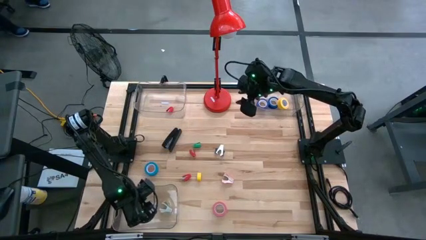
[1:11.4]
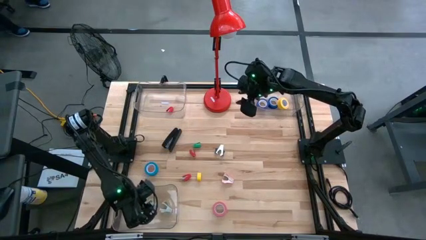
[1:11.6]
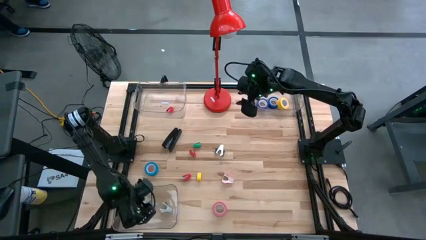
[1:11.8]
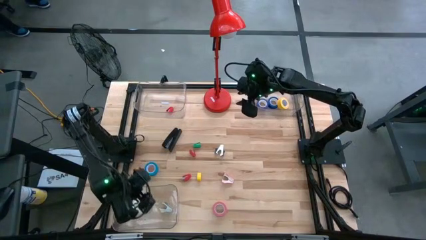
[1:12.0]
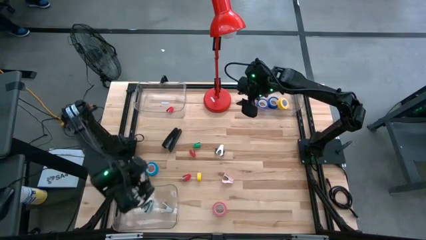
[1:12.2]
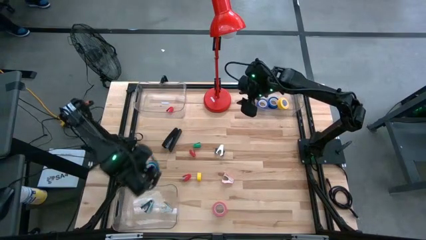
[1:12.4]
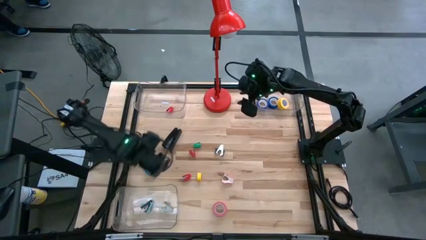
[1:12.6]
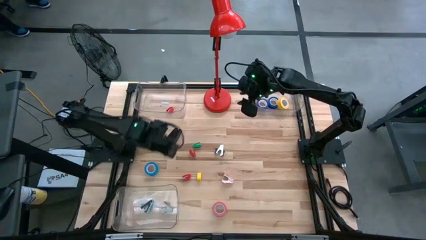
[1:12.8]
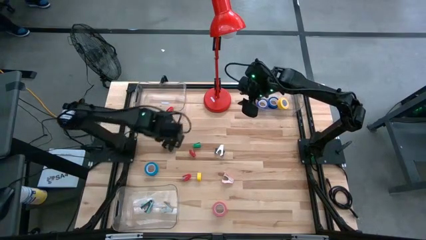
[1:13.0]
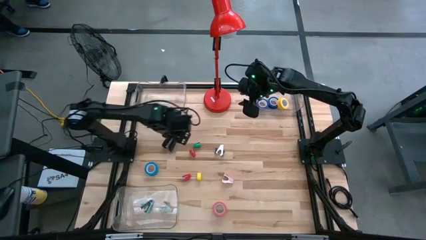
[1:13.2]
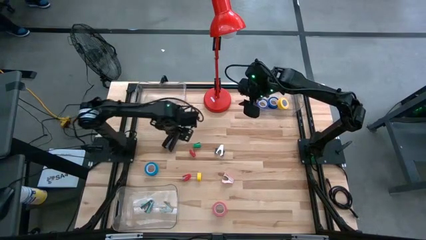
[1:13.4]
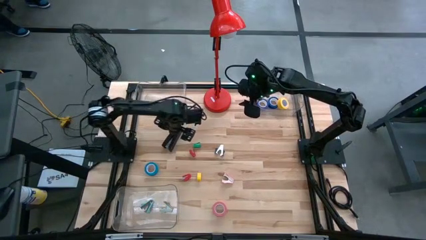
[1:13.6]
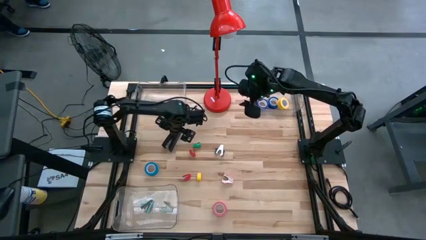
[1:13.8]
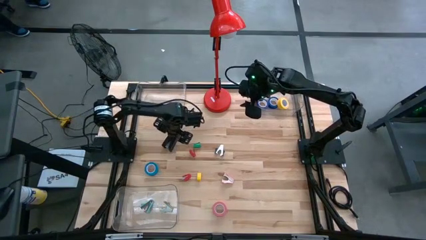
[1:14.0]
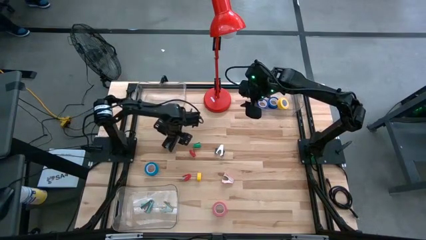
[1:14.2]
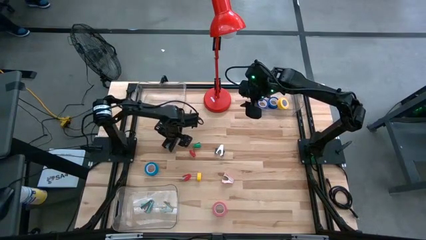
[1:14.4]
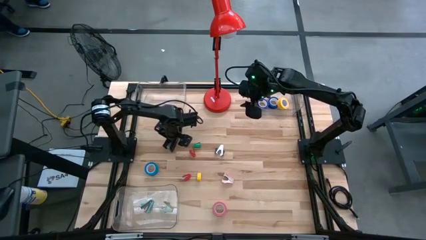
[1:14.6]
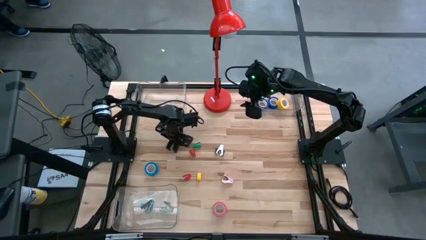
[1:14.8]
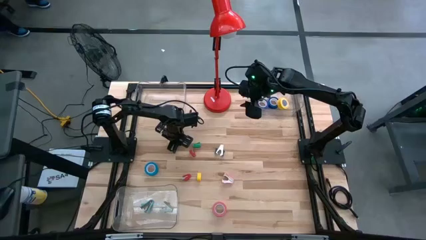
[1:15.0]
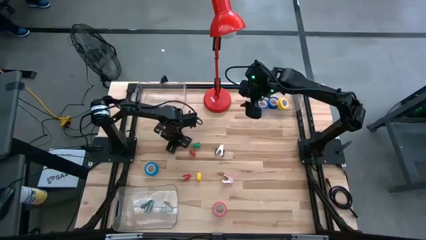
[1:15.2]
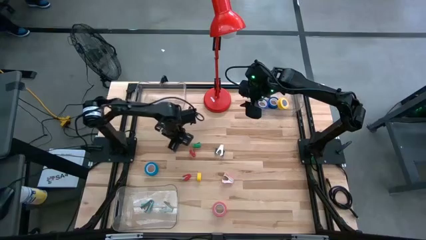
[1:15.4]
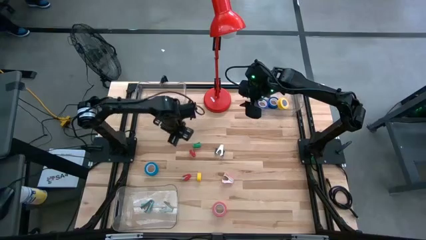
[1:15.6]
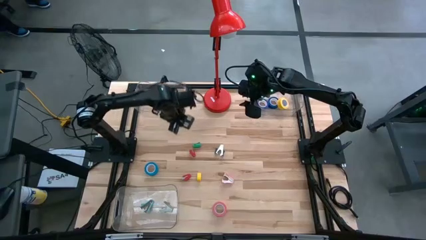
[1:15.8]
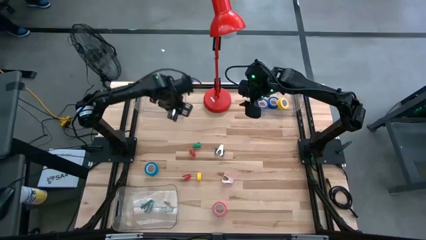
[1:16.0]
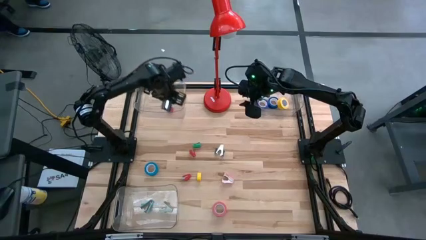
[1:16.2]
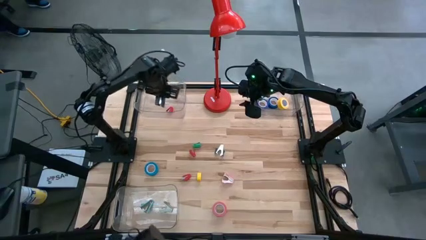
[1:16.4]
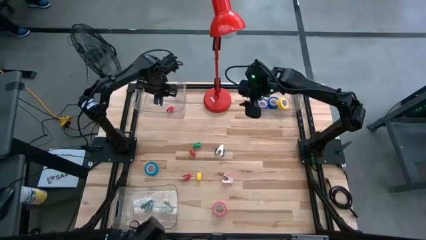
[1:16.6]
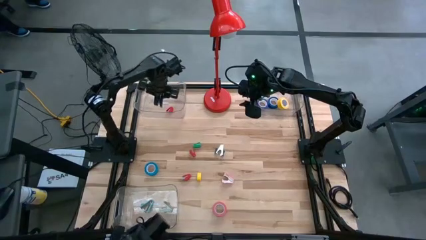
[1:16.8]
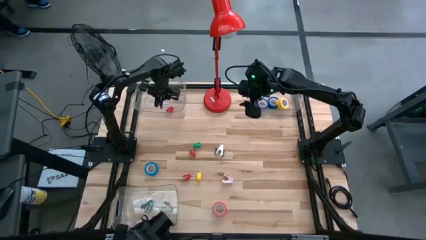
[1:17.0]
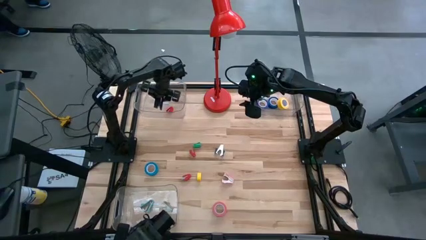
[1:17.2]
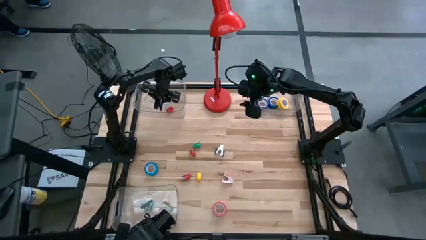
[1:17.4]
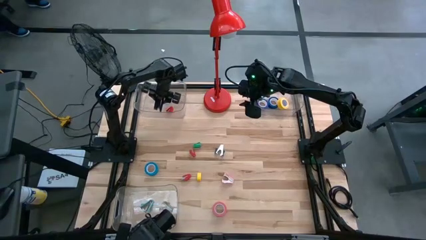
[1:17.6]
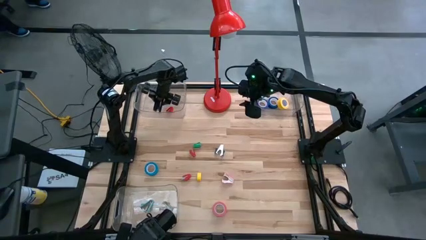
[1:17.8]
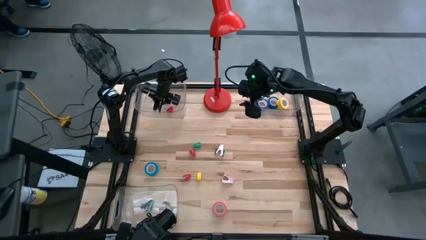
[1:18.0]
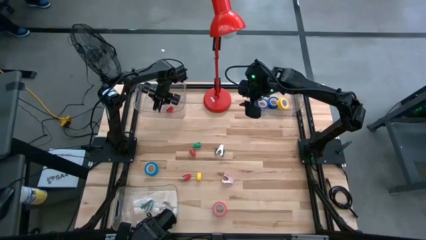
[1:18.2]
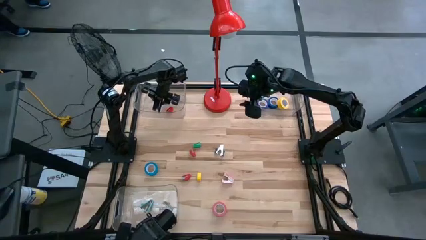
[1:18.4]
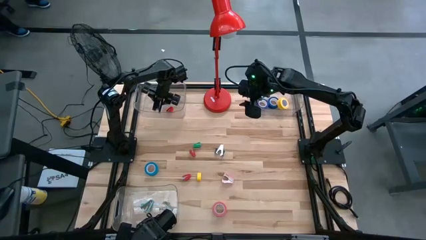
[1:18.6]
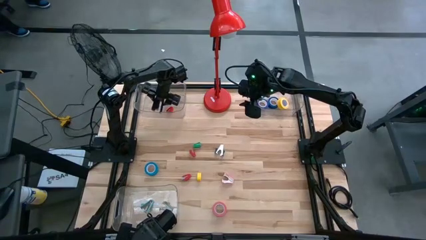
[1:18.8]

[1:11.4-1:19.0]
Task: Pick and place Stapler, Stapler remover, tape
Put the black stapler into the top left transparent bin

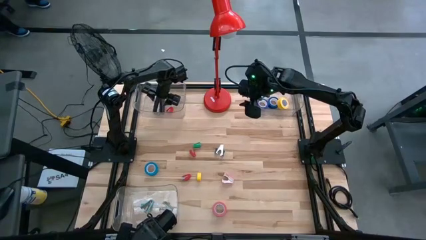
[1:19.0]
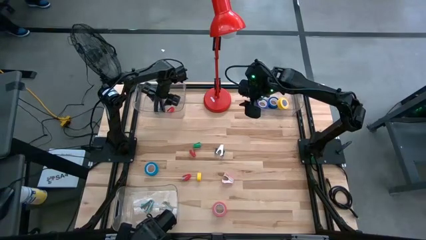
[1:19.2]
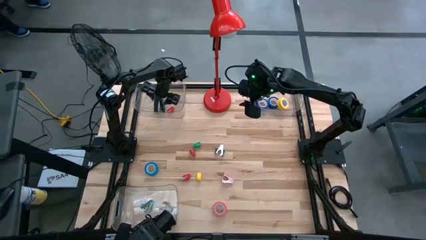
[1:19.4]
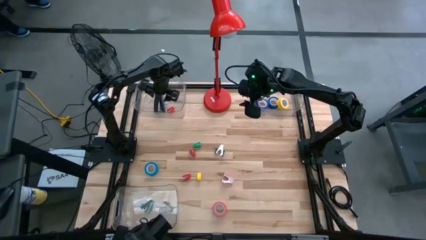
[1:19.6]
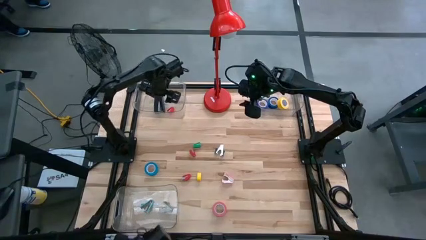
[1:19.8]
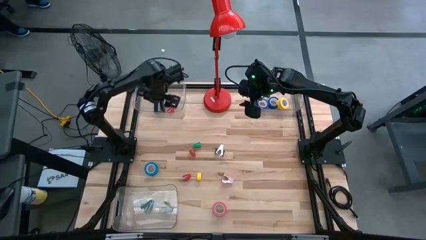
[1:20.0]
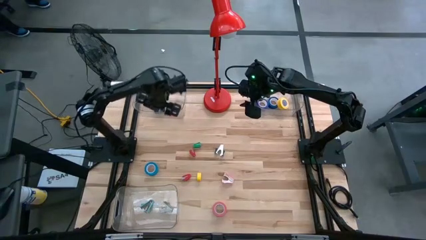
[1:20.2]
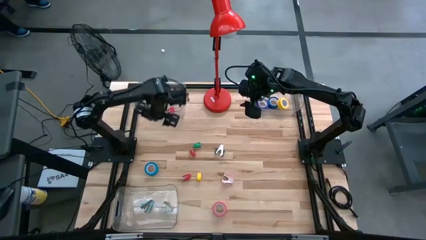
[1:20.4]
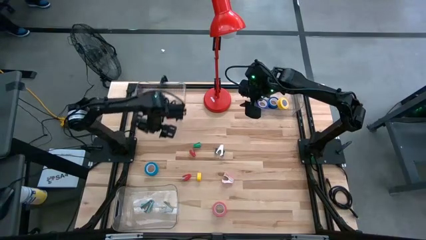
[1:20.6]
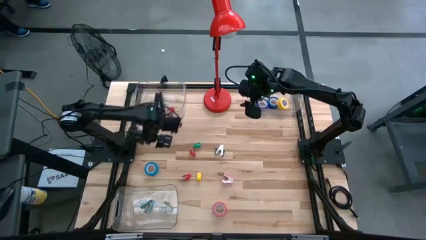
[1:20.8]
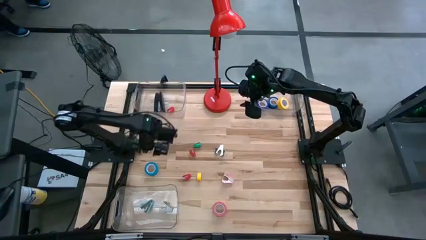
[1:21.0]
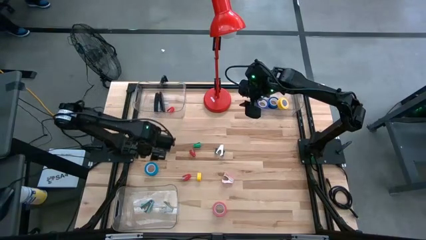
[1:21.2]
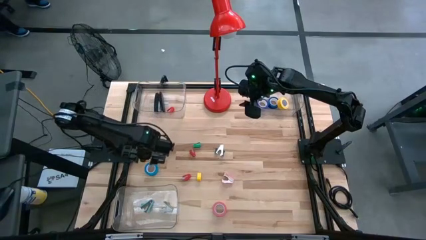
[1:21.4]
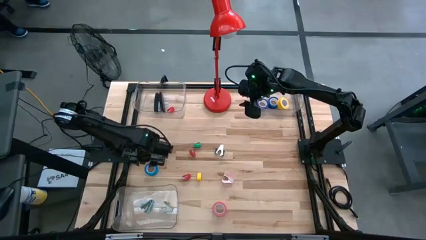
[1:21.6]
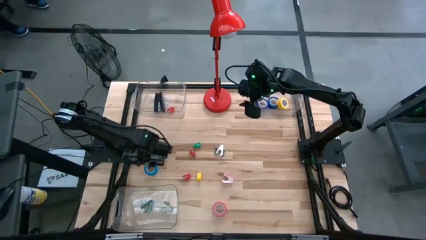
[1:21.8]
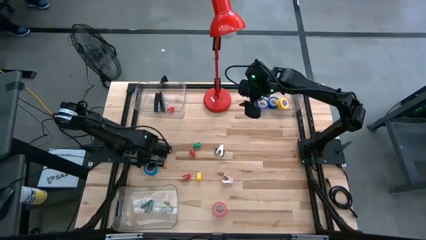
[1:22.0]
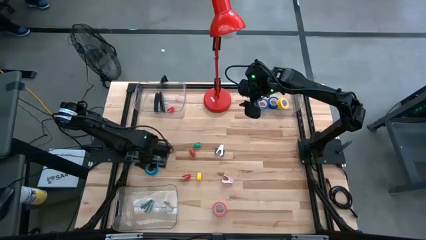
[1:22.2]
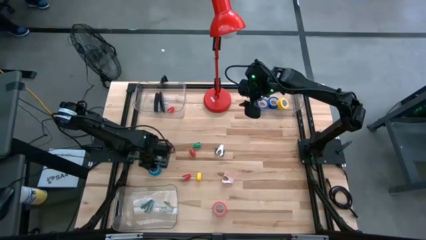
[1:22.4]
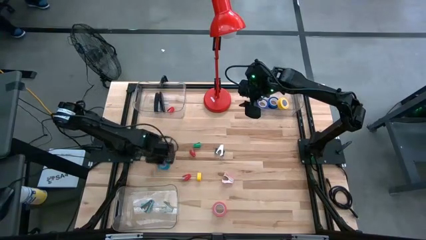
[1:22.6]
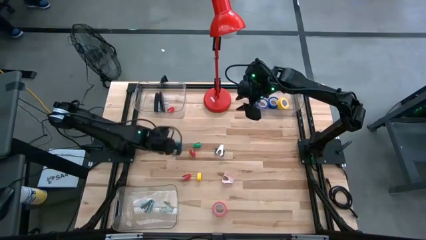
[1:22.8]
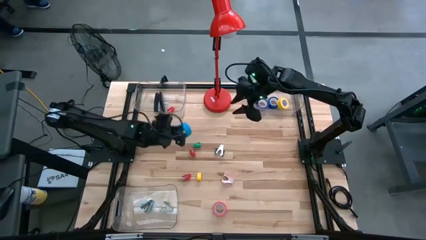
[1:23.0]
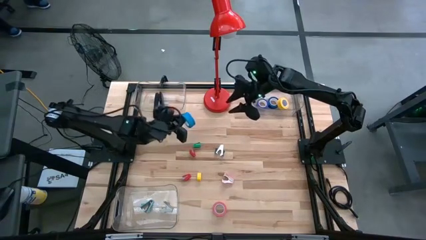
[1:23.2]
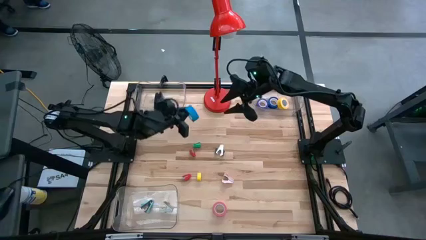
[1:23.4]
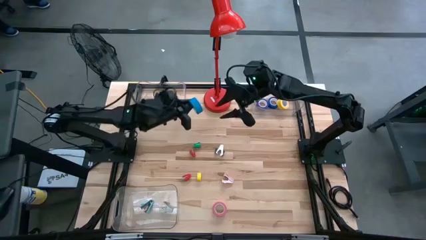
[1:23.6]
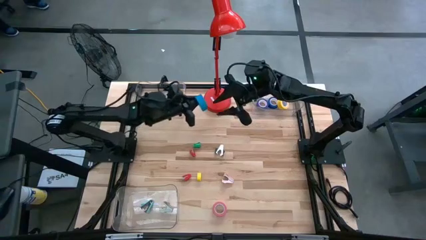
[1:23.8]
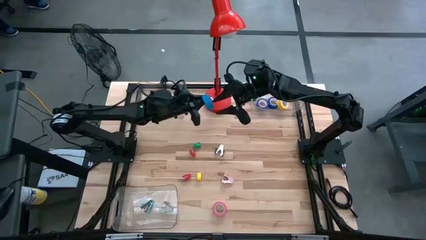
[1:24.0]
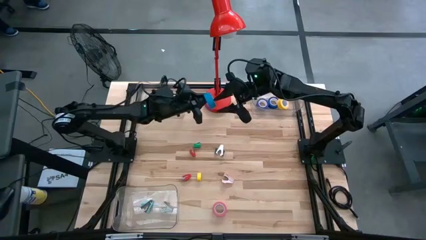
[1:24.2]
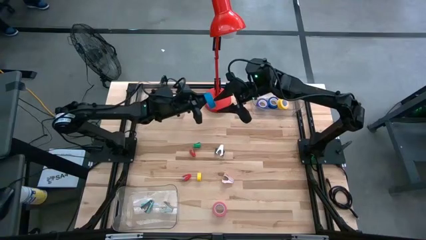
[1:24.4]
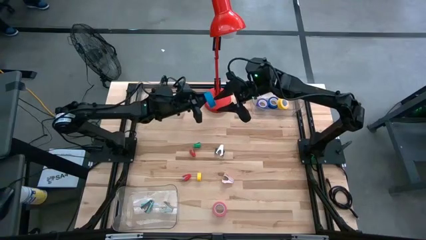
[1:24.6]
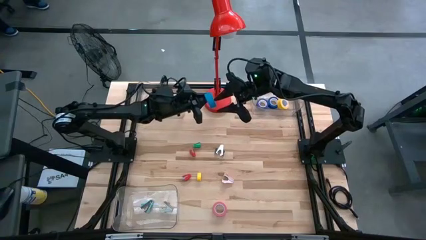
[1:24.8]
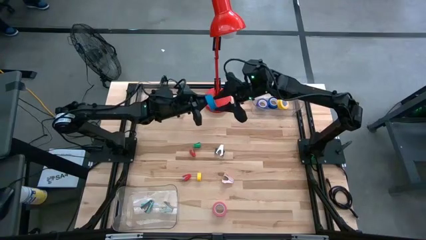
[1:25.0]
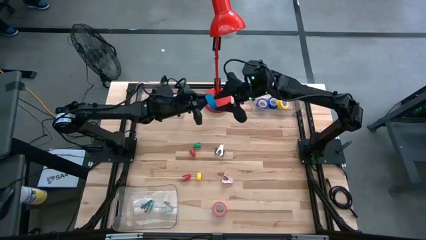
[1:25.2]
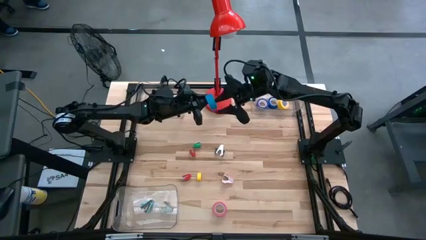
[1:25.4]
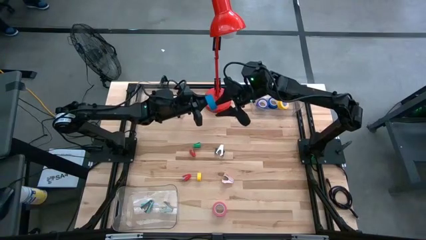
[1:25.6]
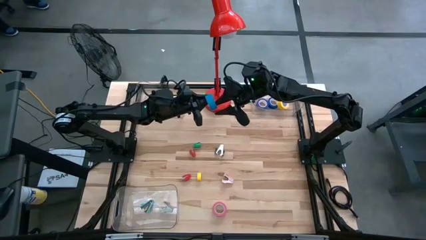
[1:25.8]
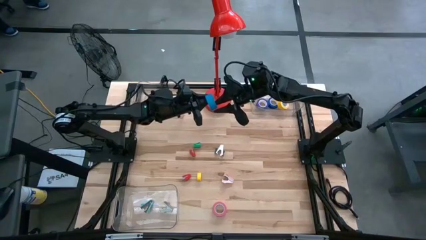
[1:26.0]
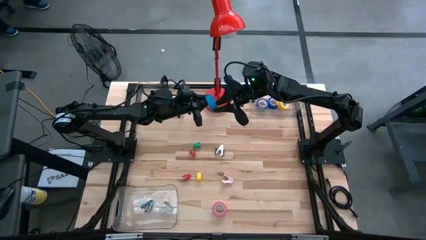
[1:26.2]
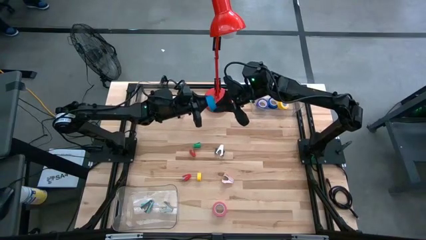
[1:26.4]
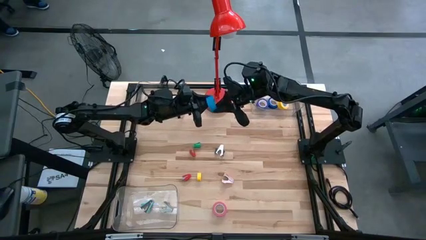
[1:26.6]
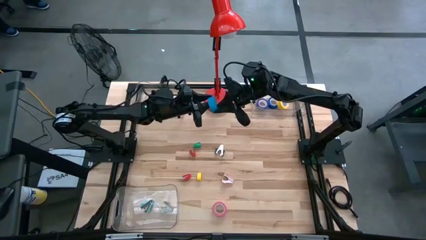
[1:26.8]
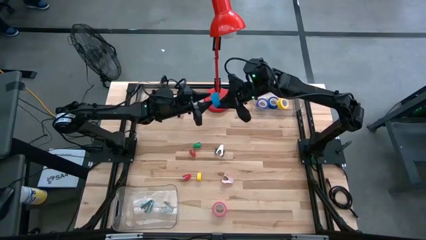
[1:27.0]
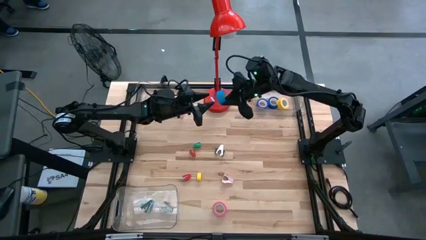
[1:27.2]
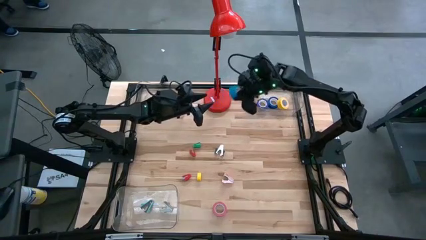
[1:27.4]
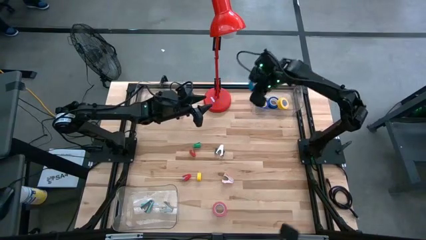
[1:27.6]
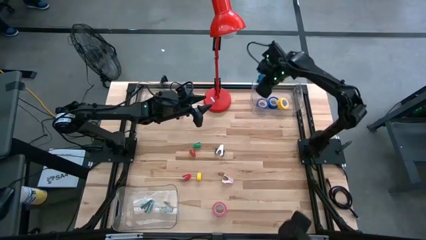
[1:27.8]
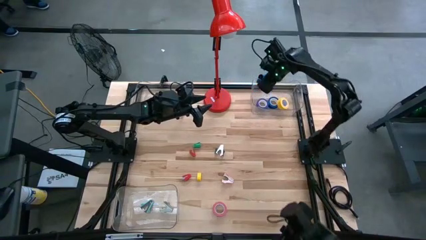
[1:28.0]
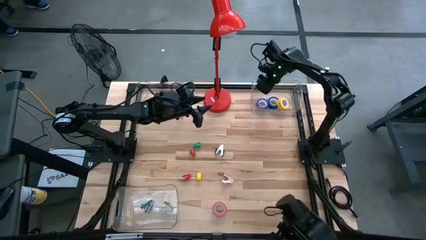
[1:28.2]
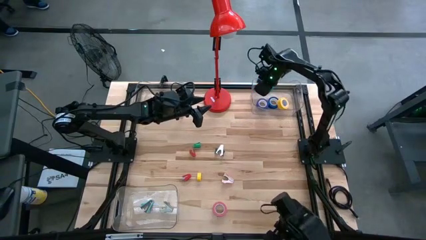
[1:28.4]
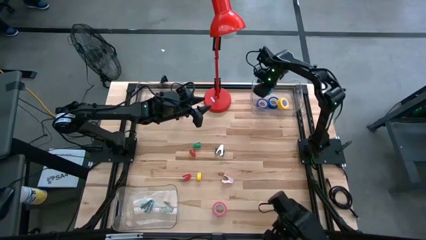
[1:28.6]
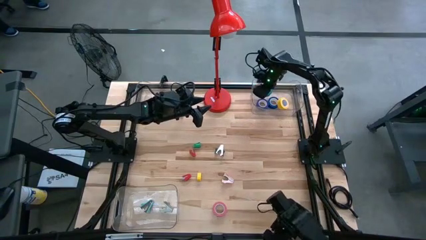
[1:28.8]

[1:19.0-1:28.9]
Put the light blue tape into the top left transparent bin
